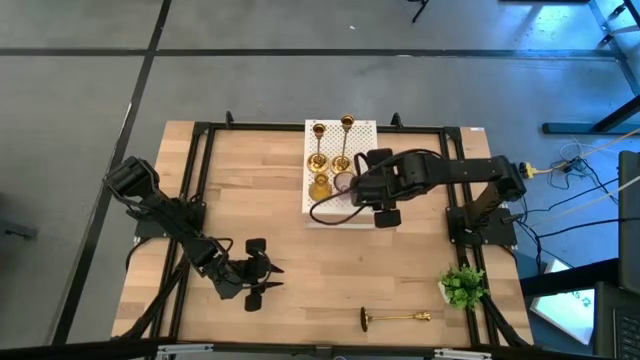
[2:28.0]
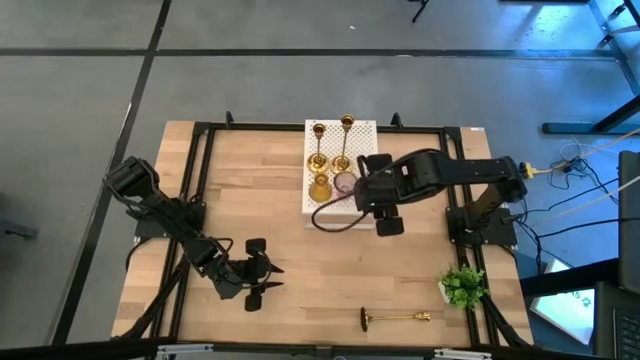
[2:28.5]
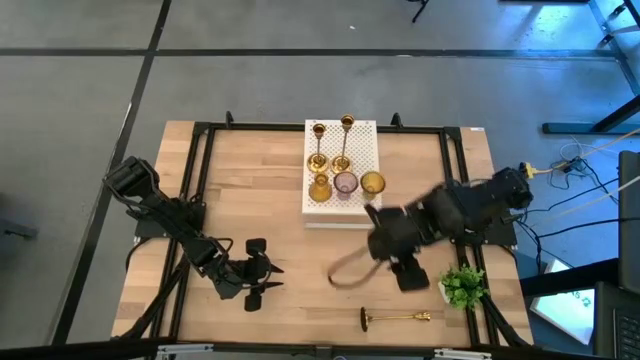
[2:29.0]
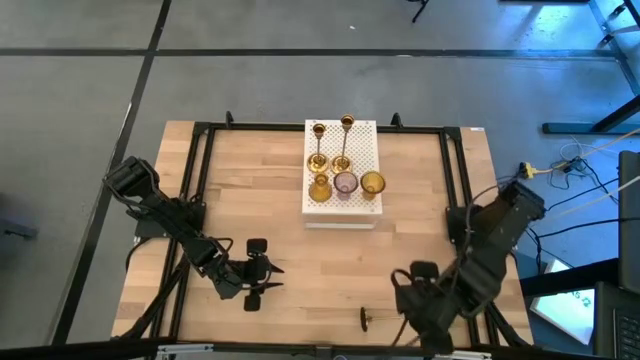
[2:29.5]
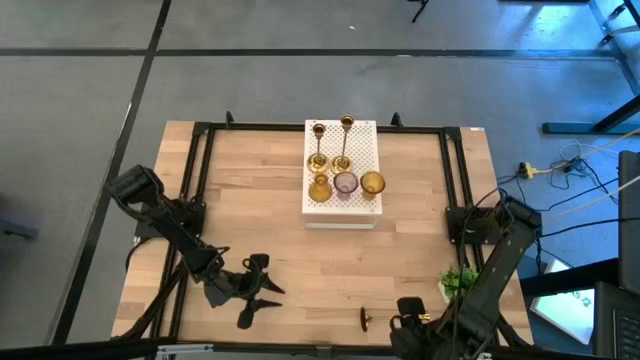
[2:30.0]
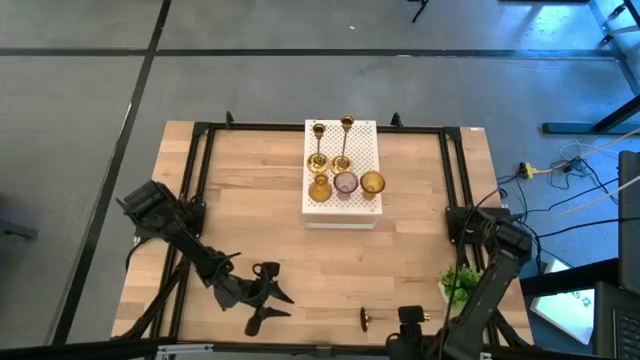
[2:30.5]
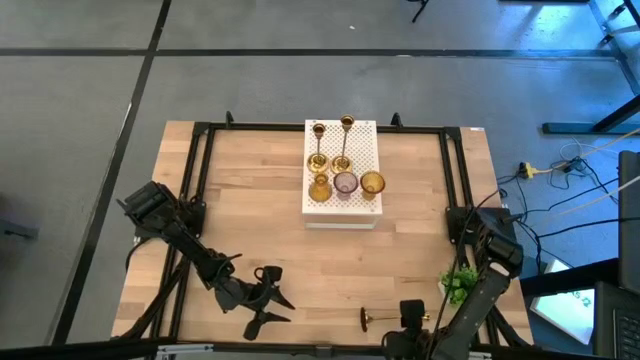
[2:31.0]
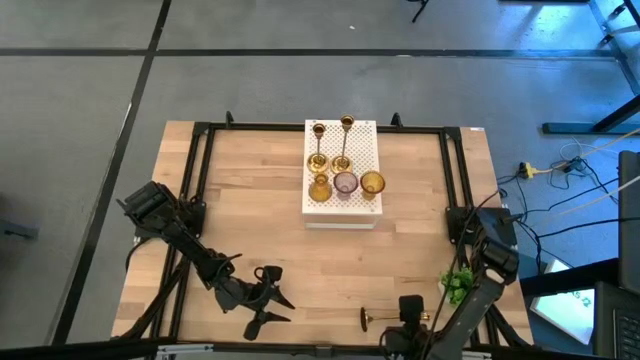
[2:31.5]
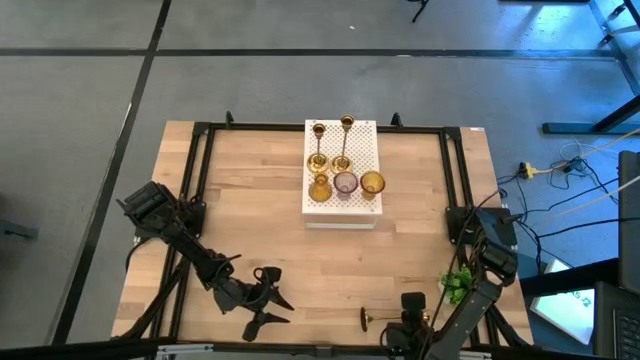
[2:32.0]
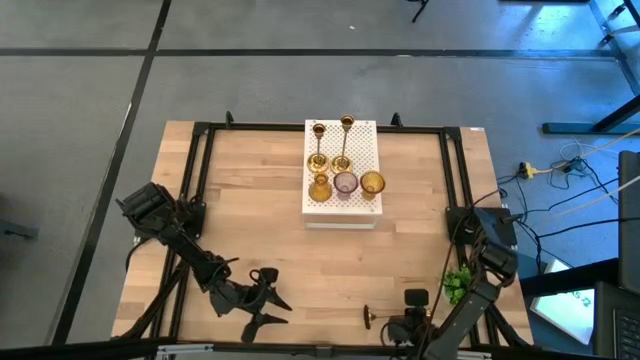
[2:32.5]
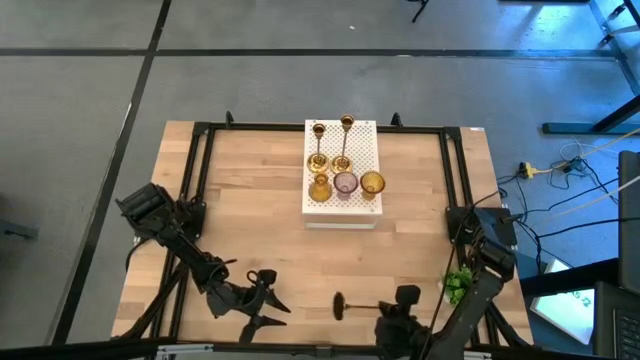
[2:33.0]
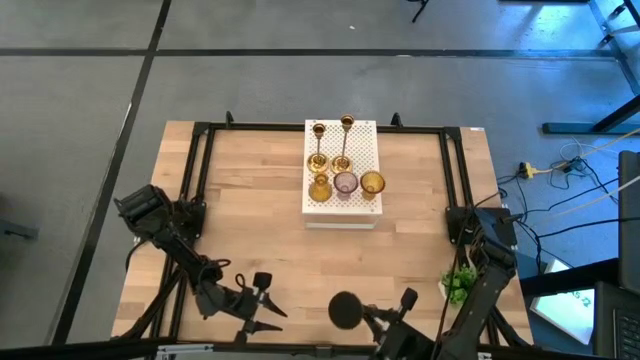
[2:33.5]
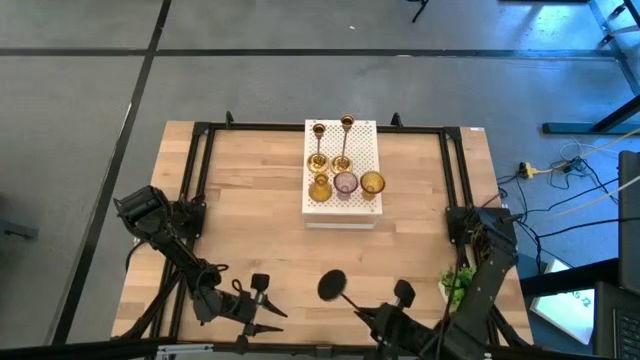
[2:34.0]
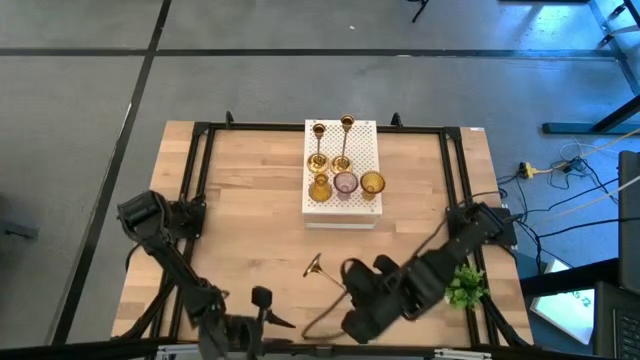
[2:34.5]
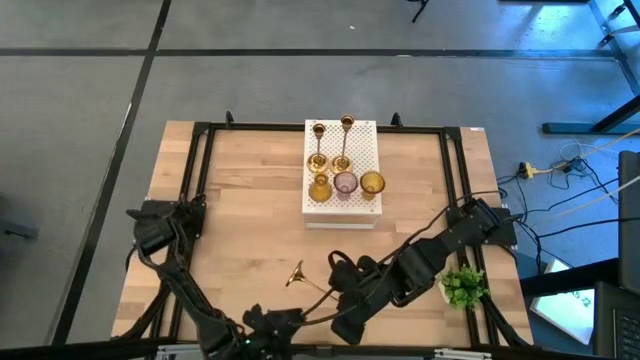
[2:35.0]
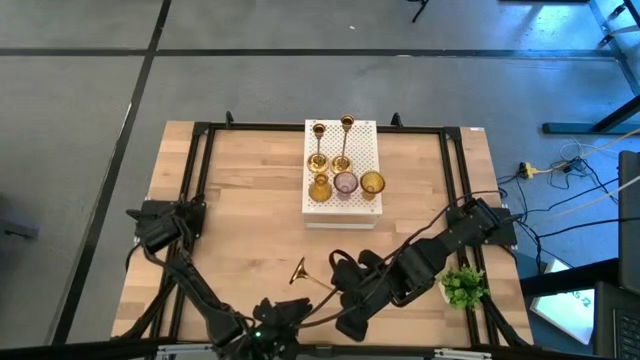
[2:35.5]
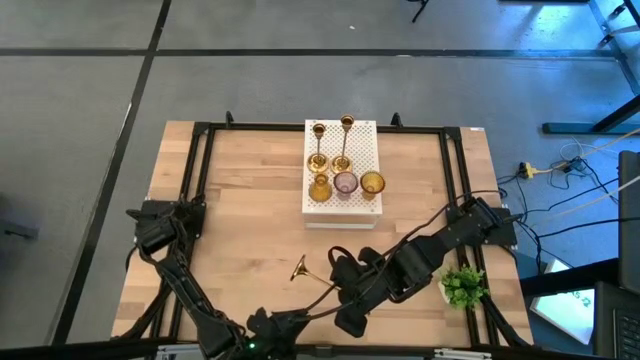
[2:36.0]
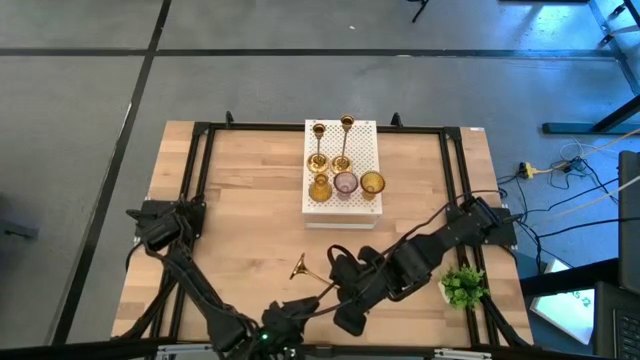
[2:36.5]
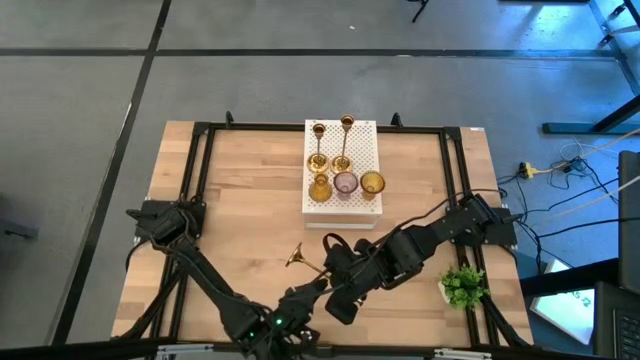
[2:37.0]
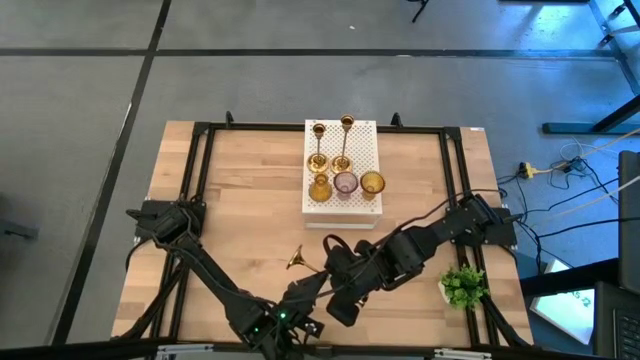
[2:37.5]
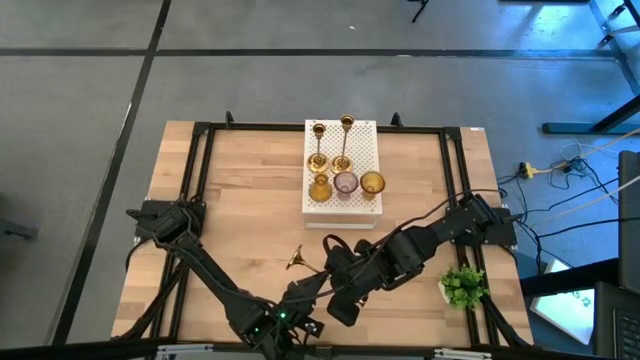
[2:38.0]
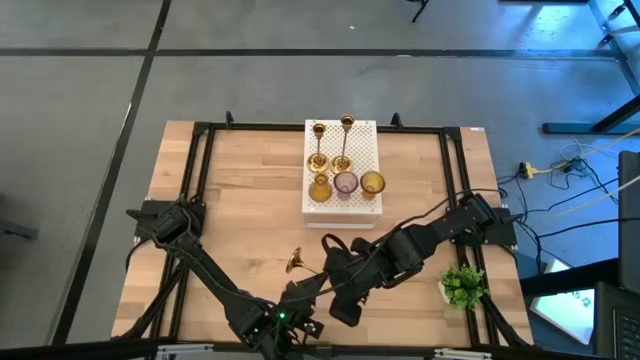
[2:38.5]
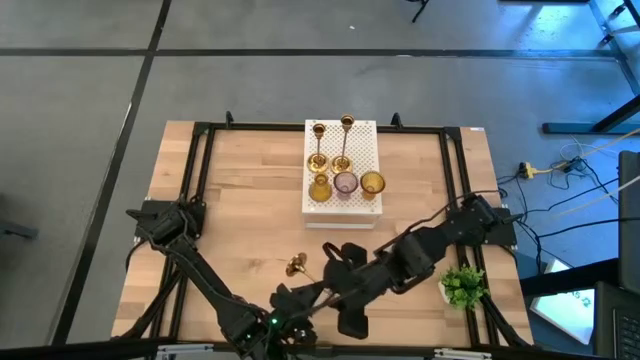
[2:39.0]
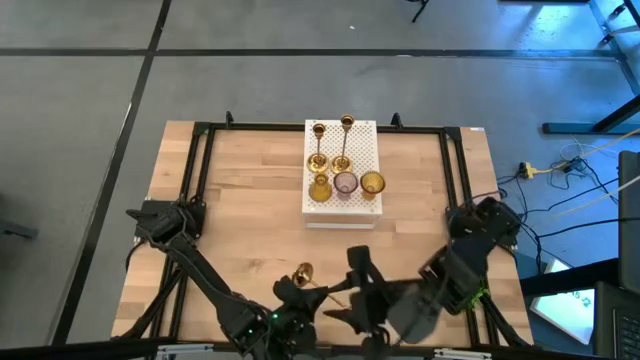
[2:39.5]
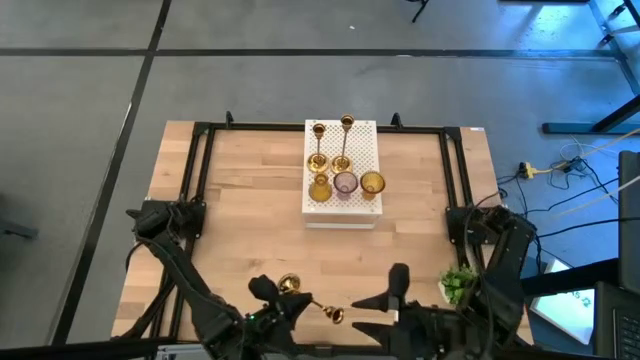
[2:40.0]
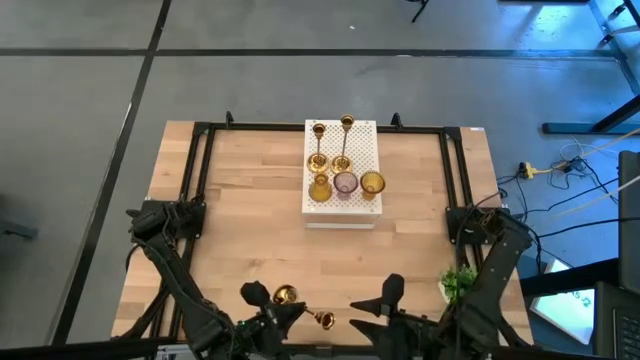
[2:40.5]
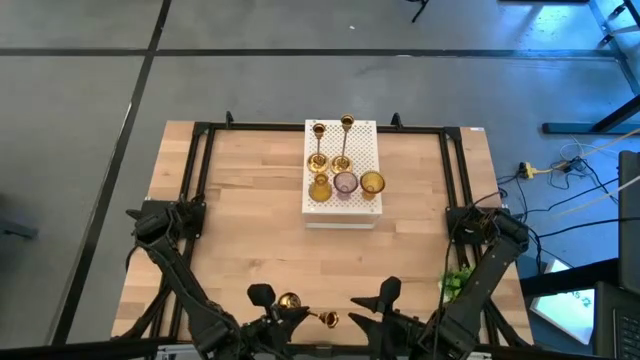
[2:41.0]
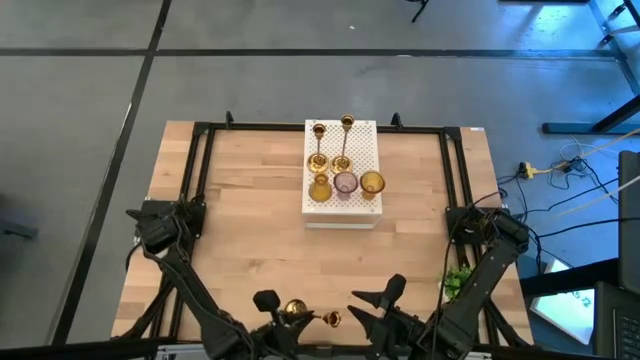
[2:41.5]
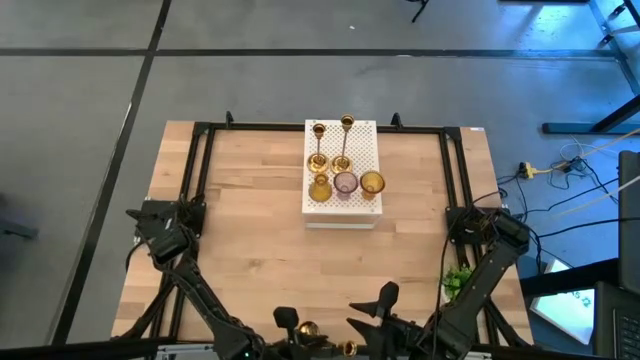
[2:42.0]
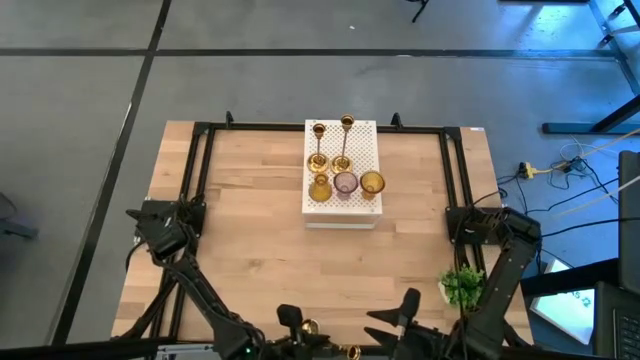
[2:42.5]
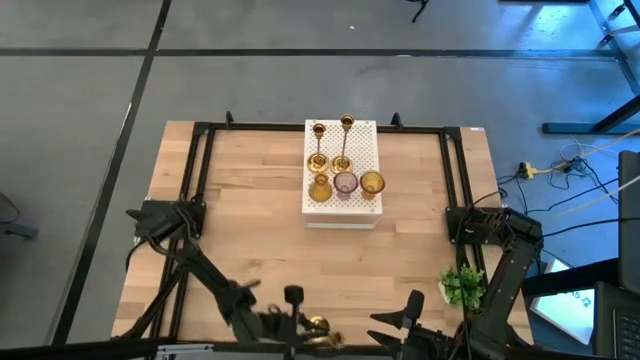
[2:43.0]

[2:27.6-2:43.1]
Task: Pick & Place candle stick holders
Put the gold candle holder on the shelf

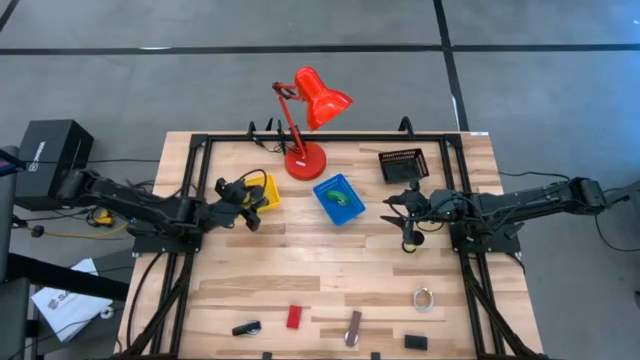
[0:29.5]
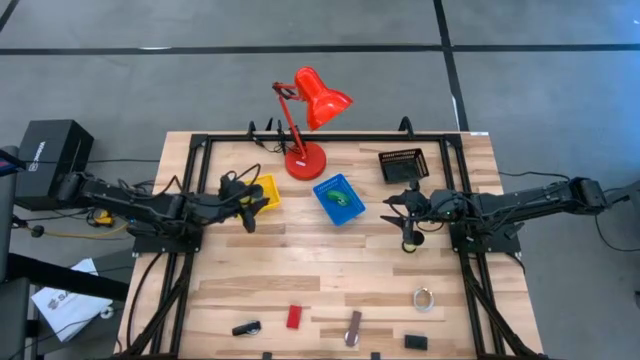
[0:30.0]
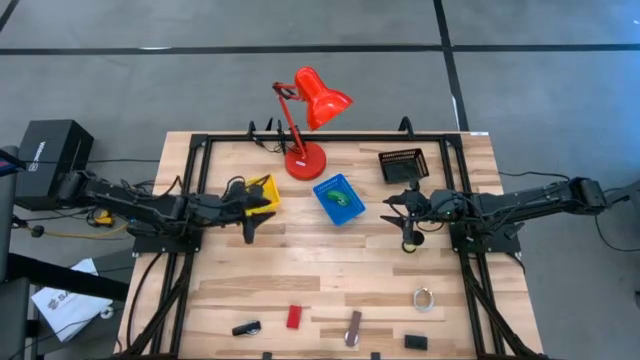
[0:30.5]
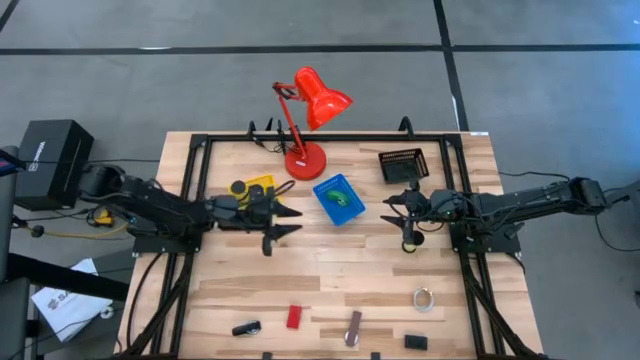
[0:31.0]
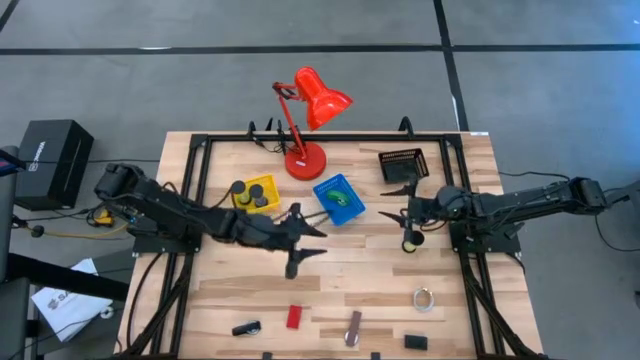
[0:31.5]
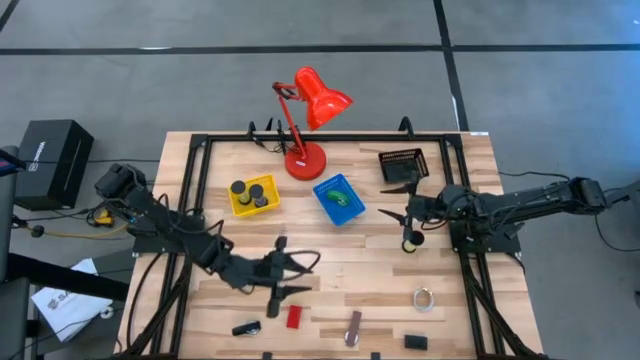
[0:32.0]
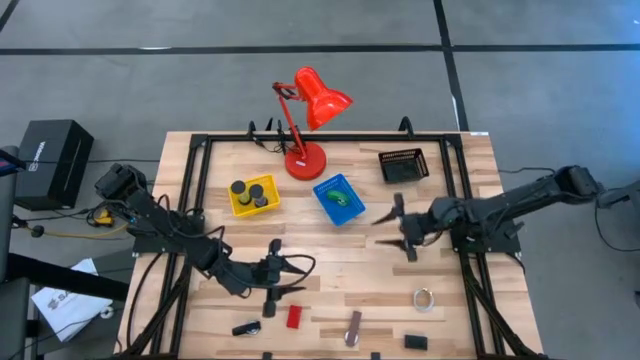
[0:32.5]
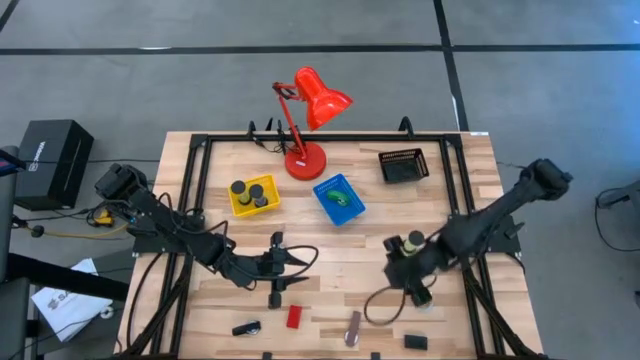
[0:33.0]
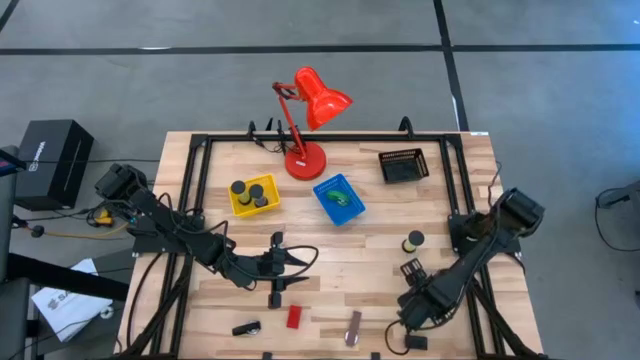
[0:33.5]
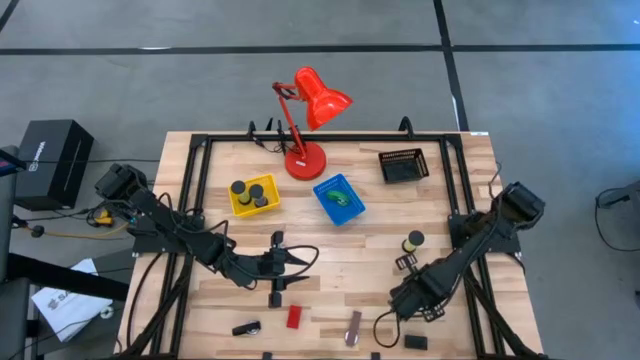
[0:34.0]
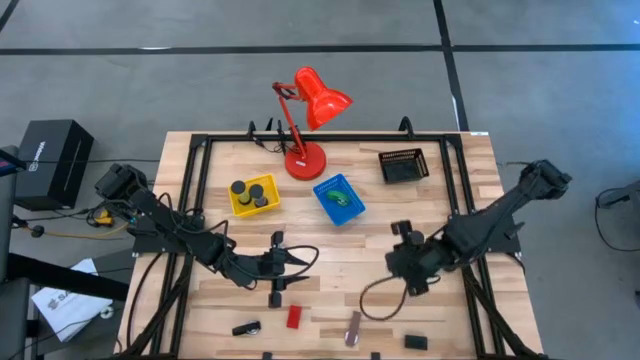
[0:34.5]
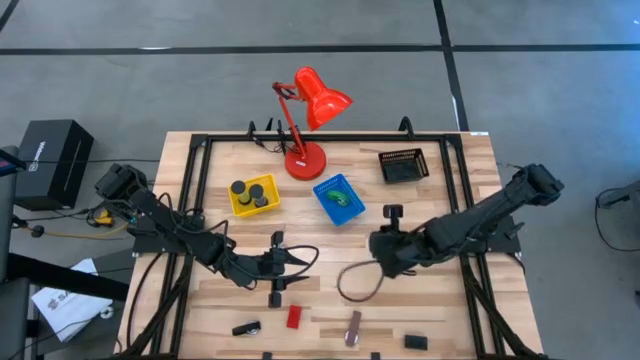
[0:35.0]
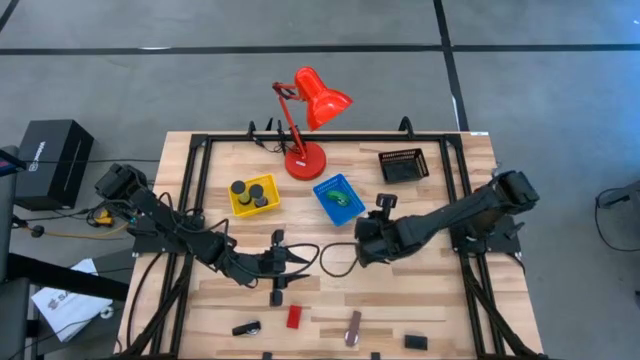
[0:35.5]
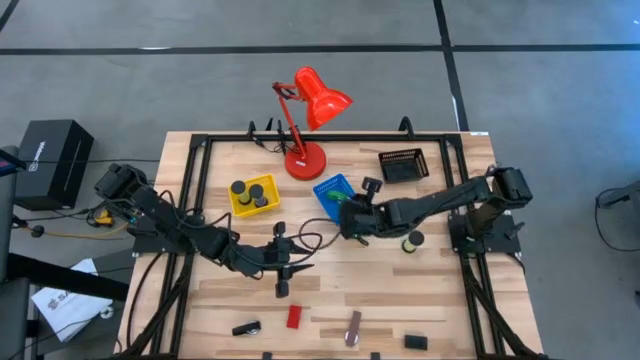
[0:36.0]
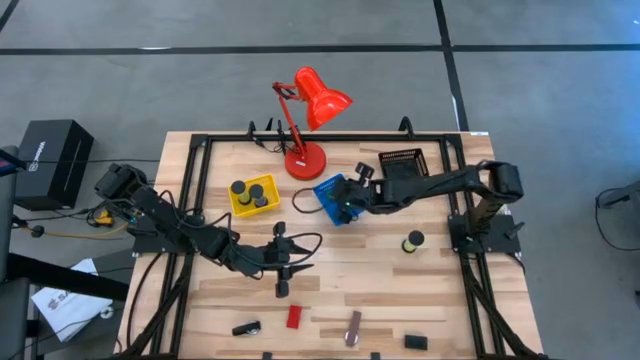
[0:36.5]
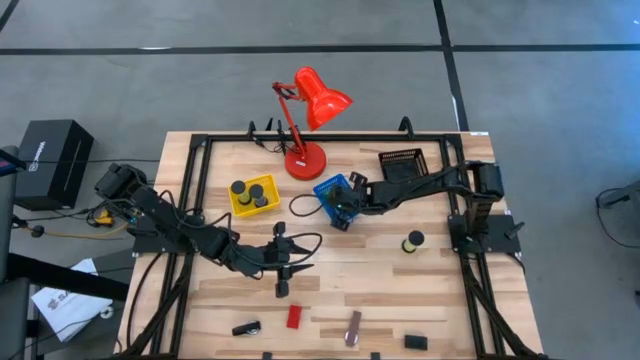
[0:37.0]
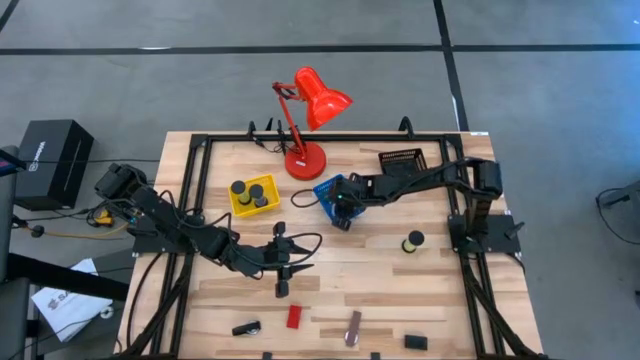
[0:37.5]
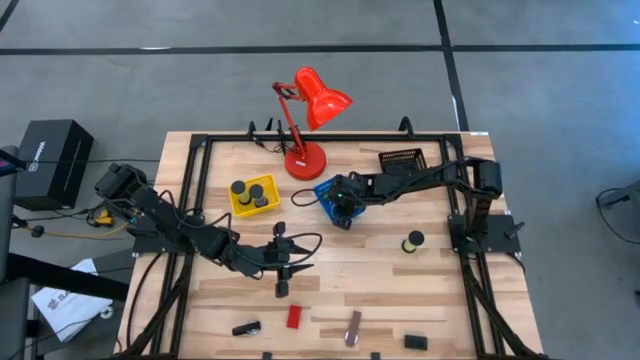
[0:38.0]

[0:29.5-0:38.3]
Task: Pick & Place Office items
Put the white wristwatch into the blue bin
